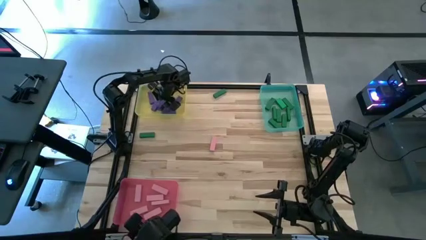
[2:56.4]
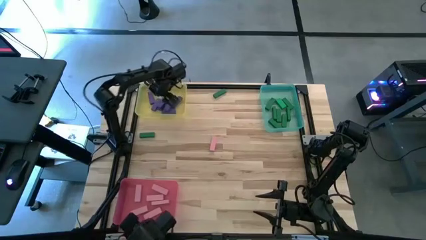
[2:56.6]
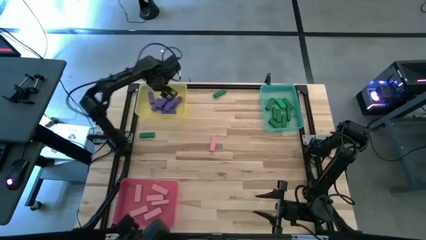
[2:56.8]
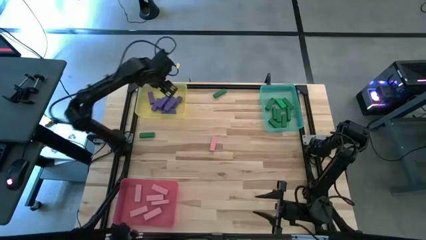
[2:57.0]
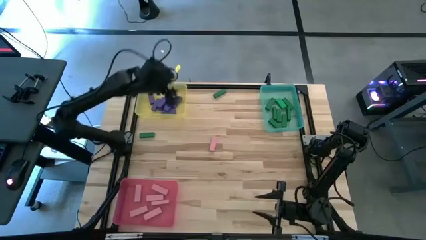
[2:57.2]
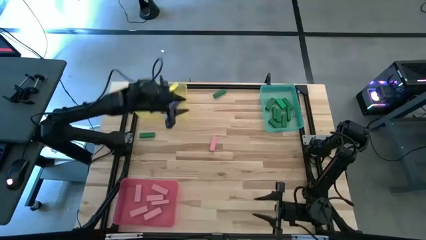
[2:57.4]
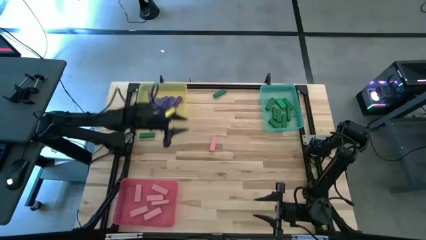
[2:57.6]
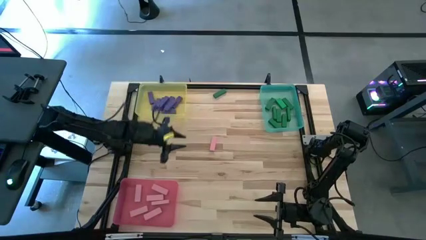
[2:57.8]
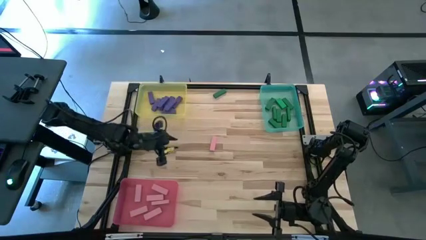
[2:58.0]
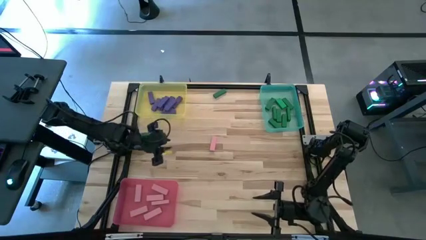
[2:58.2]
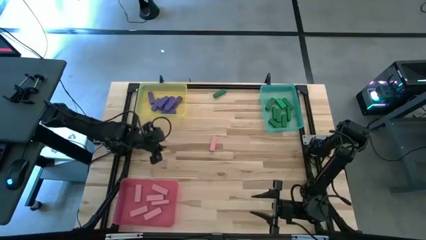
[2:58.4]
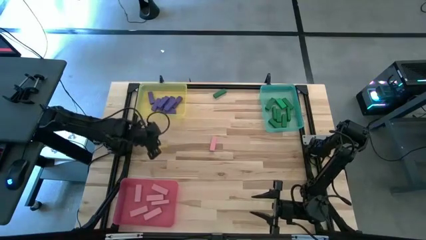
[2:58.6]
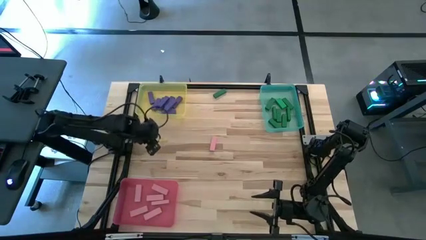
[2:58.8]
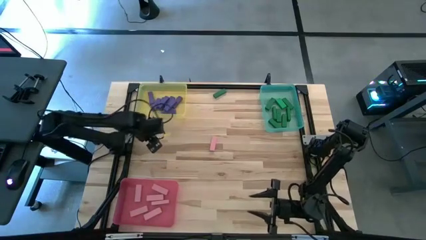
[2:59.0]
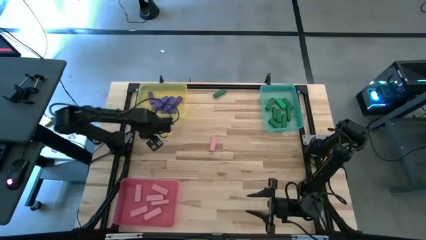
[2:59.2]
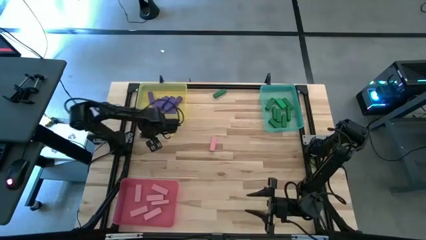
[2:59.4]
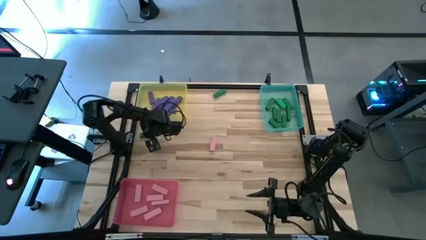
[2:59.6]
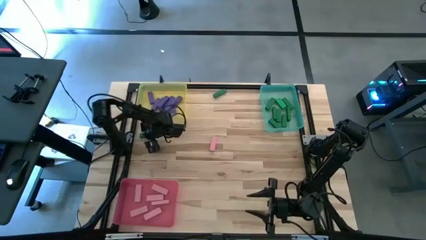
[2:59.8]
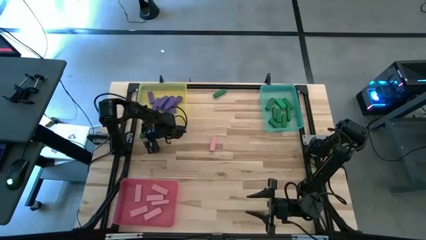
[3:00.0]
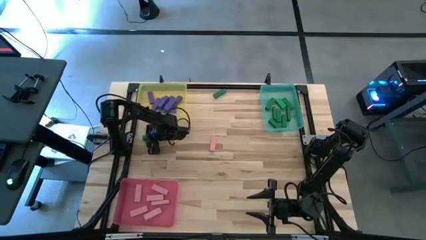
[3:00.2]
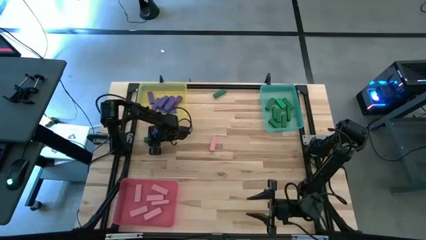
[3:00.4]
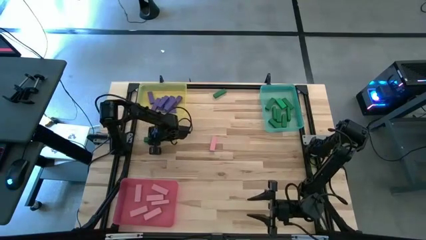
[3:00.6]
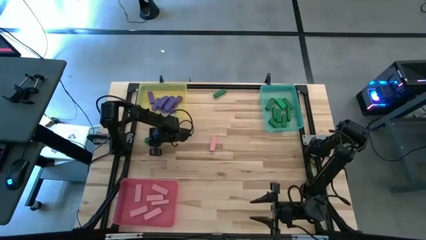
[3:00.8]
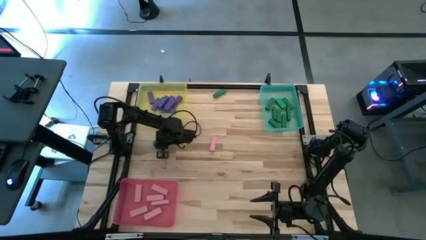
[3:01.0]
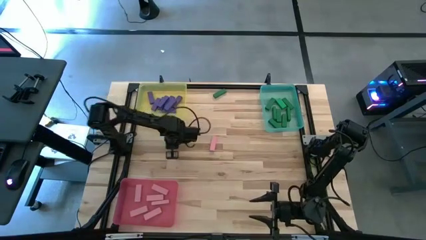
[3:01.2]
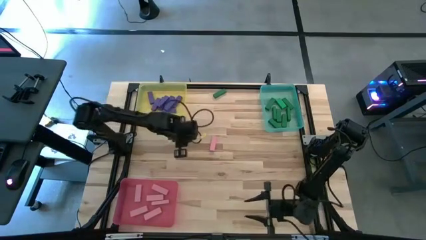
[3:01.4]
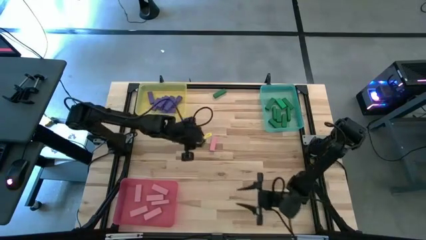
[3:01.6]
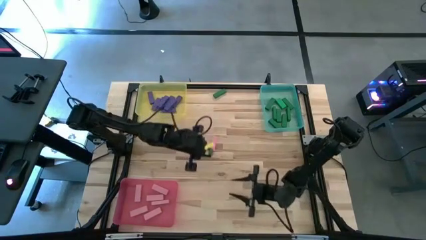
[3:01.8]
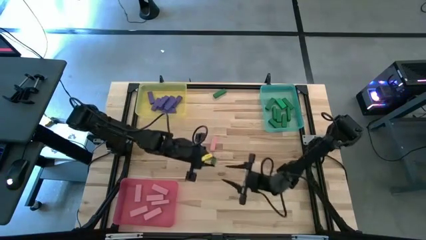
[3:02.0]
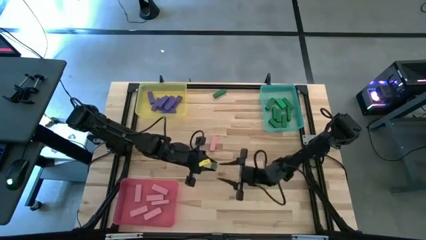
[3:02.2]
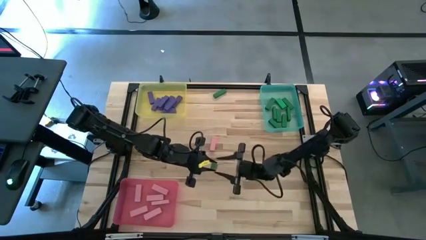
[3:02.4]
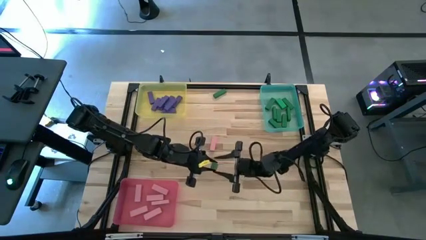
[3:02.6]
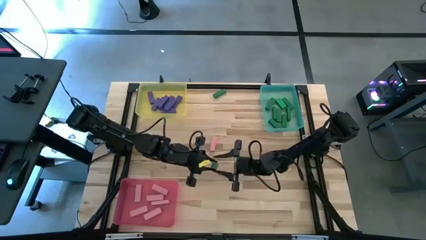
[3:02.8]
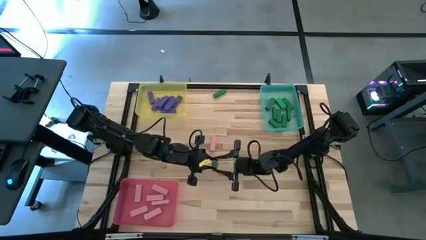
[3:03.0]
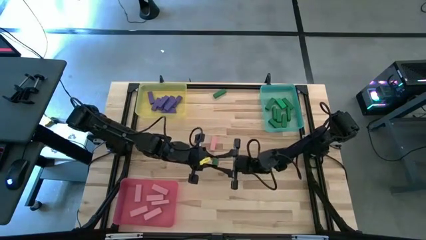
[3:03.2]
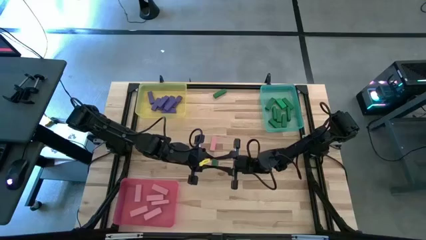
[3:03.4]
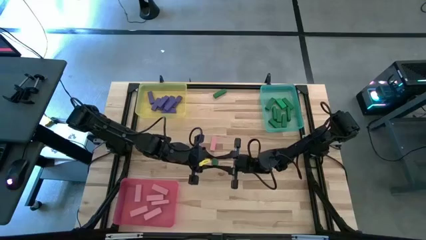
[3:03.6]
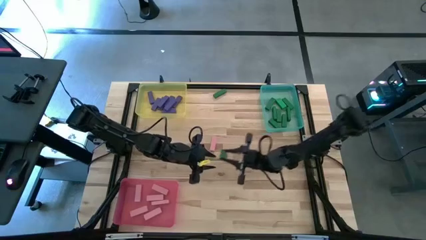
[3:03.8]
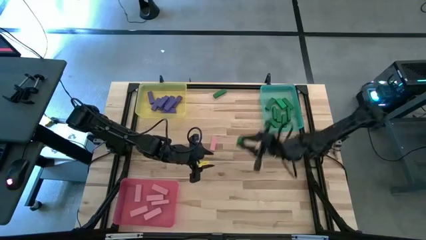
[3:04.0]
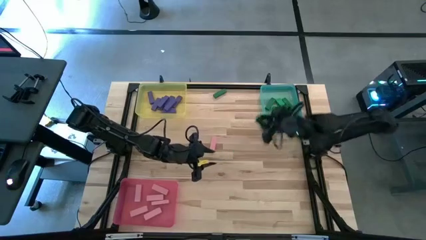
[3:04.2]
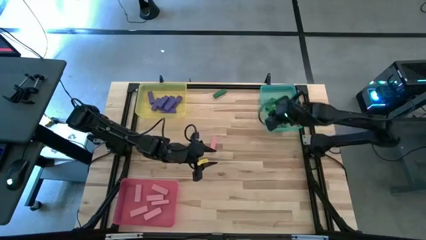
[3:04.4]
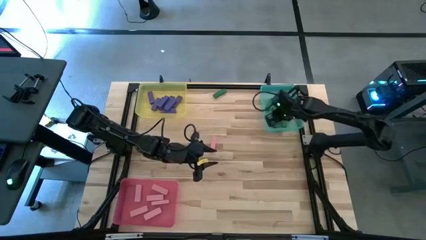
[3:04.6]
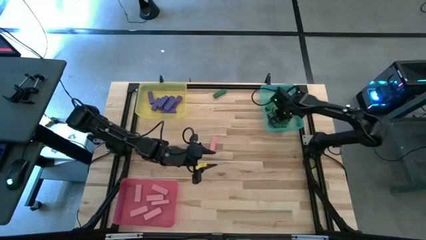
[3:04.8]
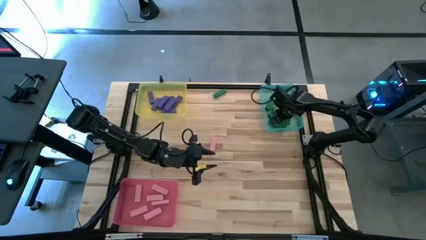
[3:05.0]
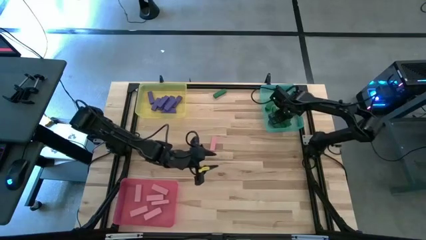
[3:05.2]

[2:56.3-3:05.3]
Task: Sort blocks
Put the green wooden block into the green bin

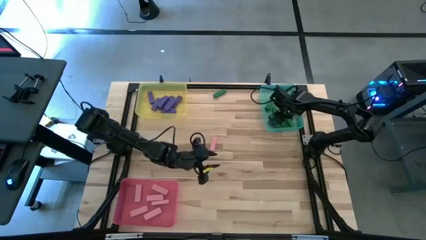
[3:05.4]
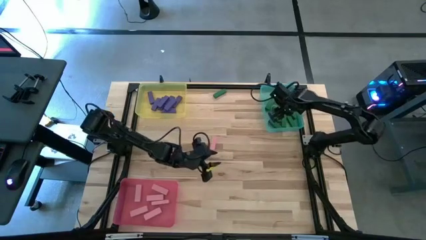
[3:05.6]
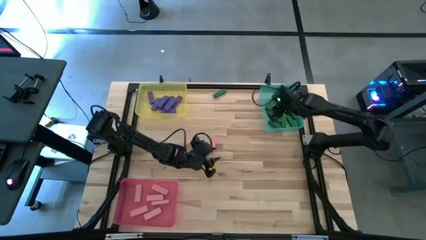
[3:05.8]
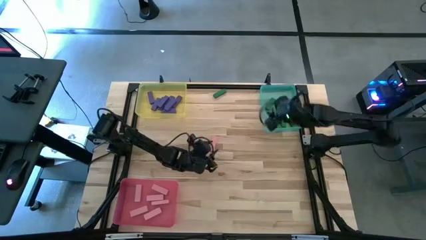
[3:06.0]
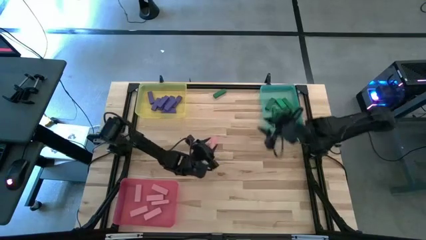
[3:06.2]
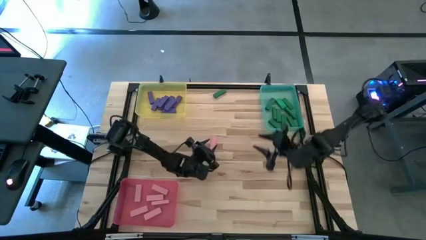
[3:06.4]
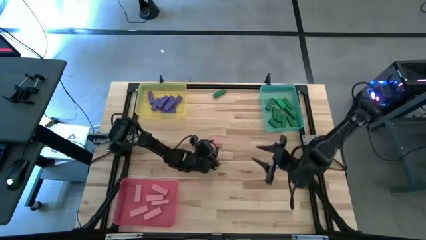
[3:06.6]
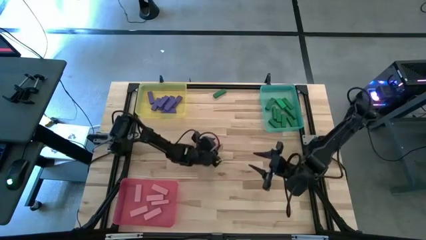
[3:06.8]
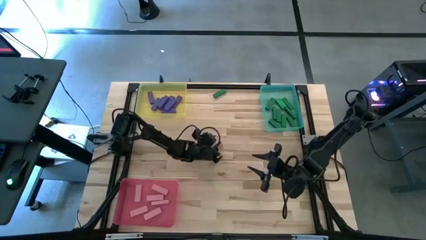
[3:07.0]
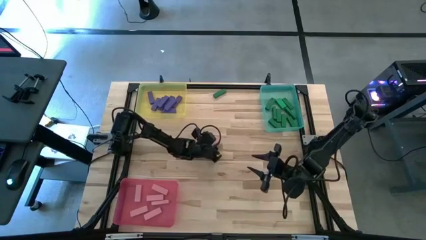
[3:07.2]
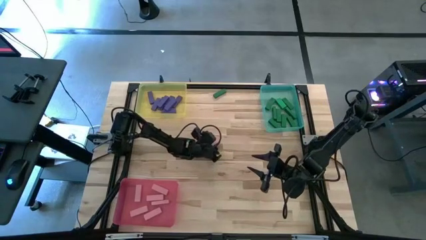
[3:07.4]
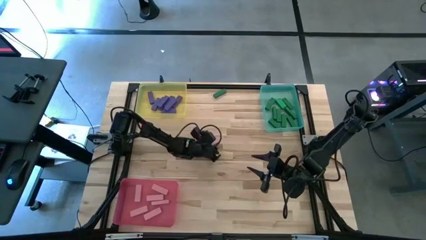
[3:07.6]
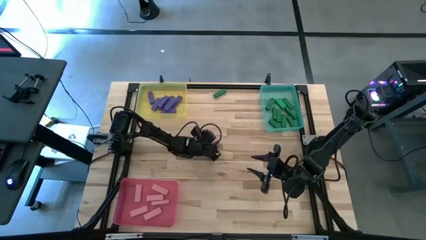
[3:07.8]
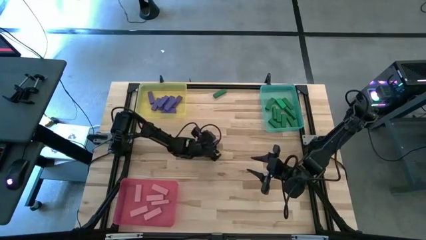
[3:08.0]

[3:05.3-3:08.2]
Put the pink wooden block into the pink bin

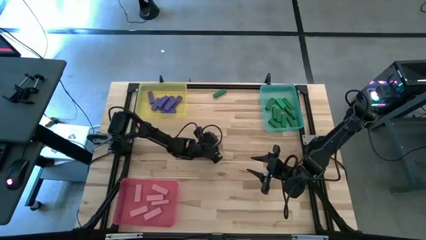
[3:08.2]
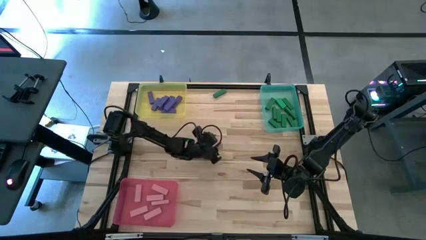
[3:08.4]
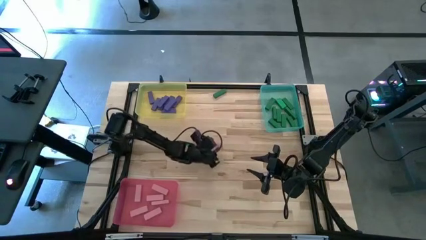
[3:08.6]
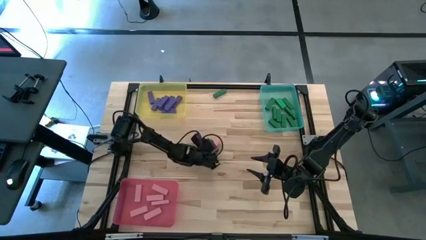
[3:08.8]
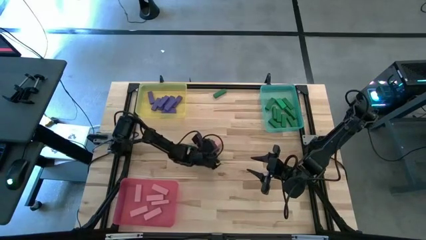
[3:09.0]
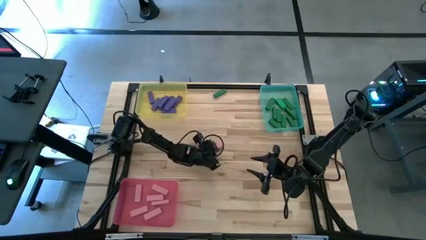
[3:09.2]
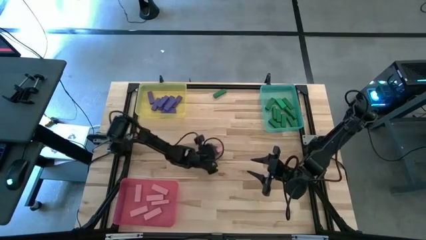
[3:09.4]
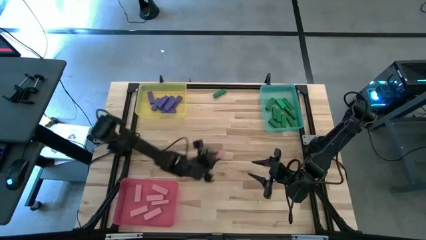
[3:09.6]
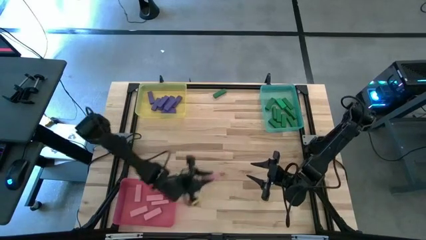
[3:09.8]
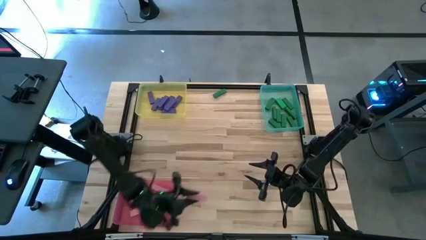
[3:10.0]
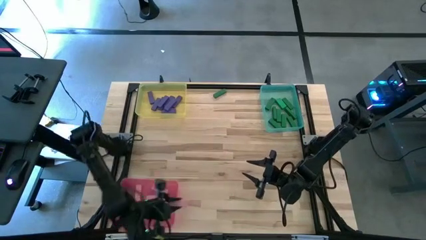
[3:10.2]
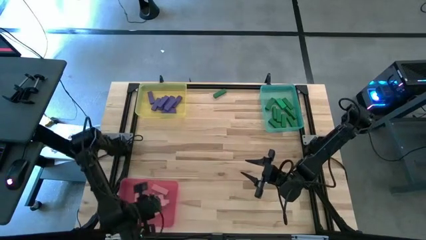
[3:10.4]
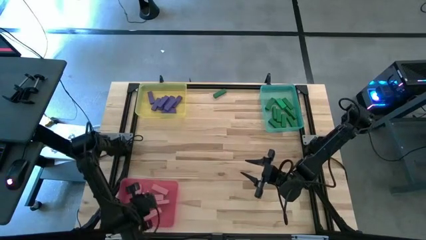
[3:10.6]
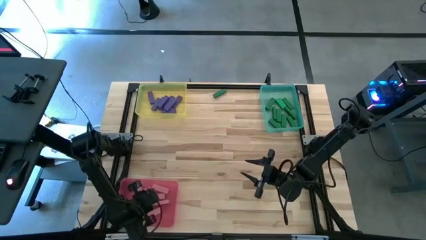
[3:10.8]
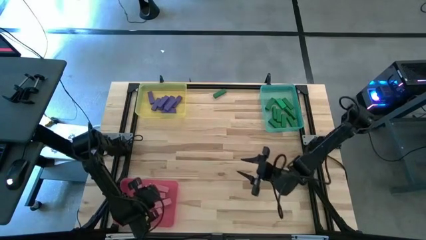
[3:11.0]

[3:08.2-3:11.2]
Put the pink wooden block into the pink bin

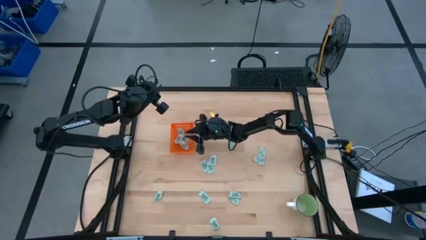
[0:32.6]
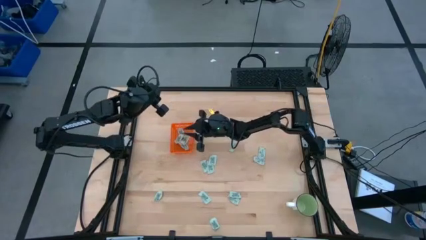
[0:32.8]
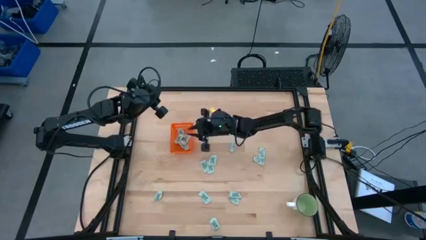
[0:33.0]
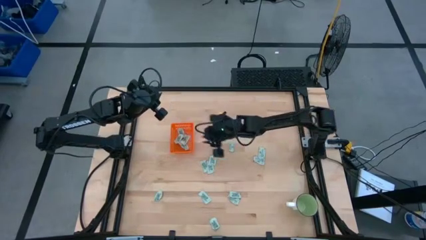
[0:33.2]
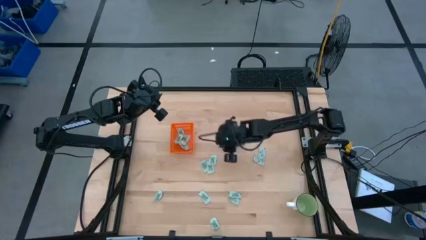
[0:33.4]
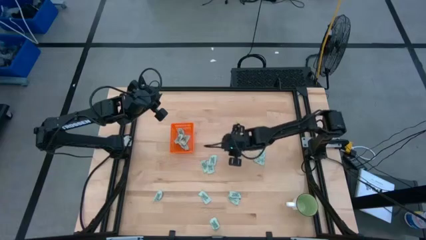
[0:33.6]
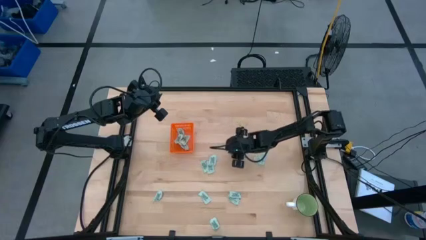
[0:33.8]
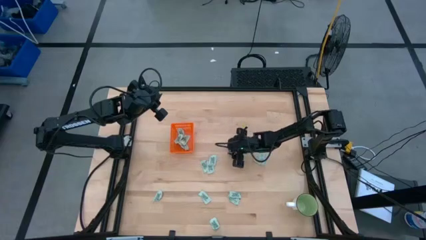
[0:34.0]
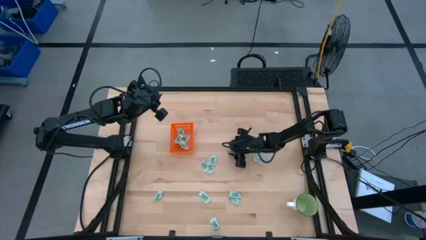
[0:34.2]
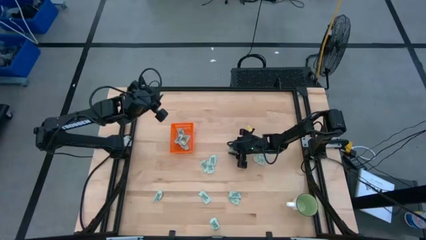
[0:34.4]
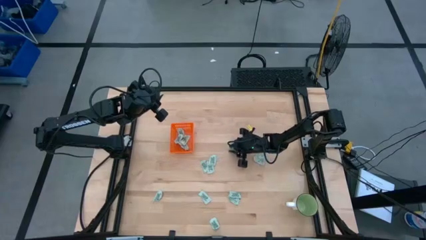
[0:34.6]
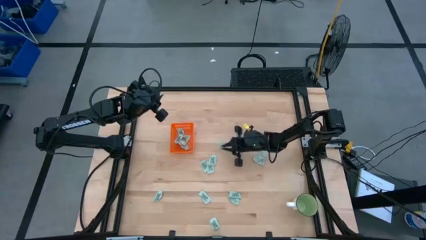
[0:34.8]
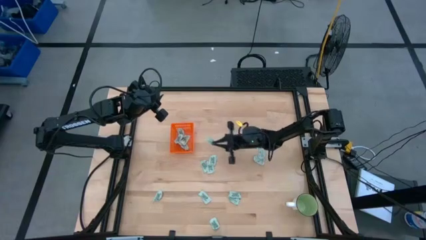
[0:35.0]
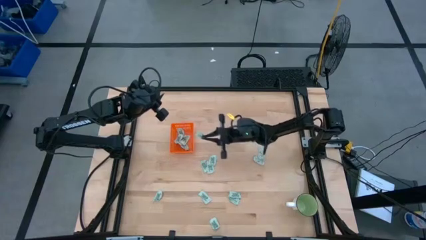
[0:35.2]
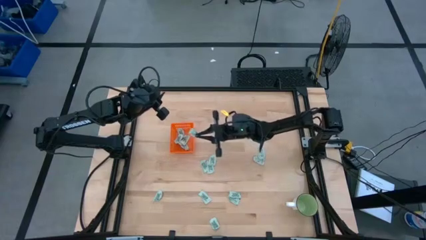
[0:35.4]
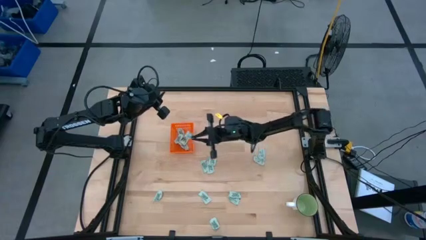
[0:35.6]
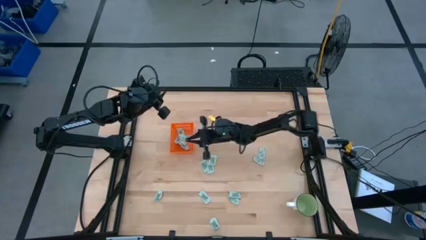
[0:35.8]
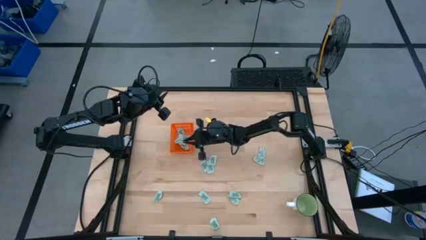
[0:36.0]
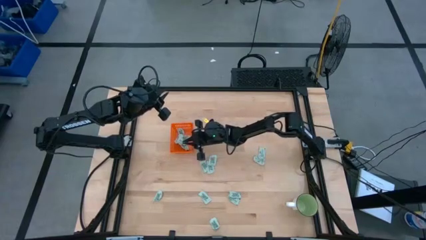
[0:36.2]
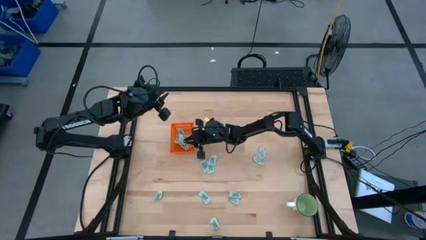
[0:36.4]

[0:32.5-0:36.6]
Task: Pick and place Stevia / Truvia into bins
Put the green stevia packet into the orange bin
